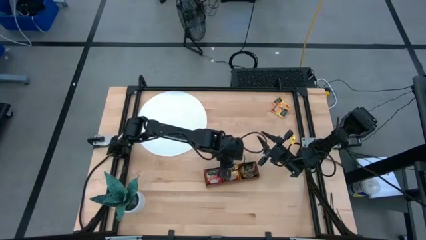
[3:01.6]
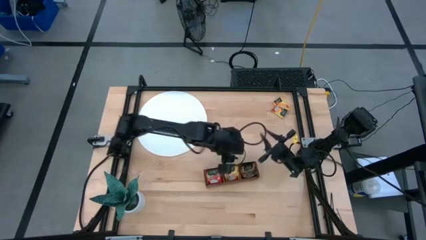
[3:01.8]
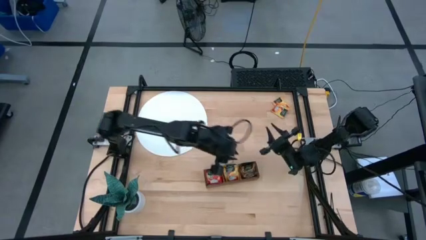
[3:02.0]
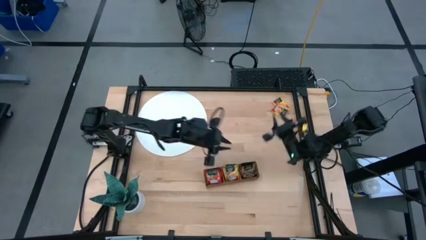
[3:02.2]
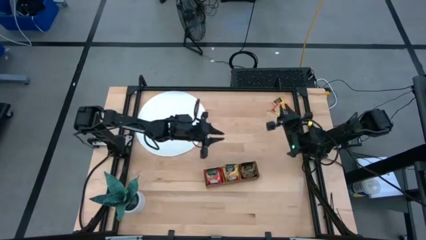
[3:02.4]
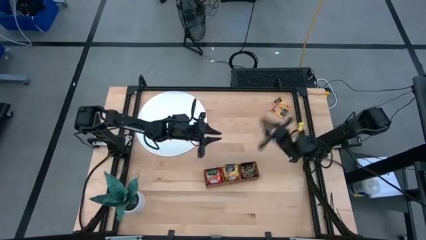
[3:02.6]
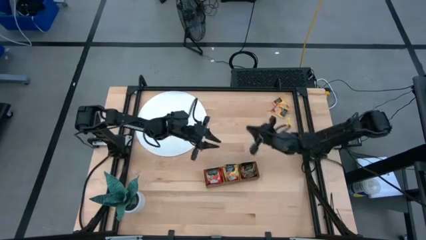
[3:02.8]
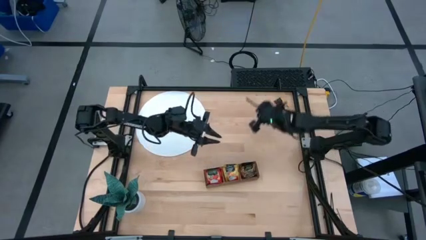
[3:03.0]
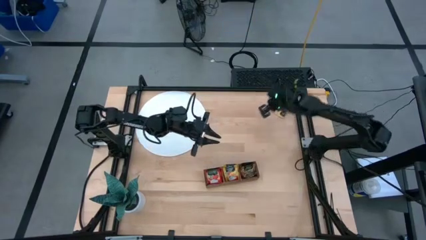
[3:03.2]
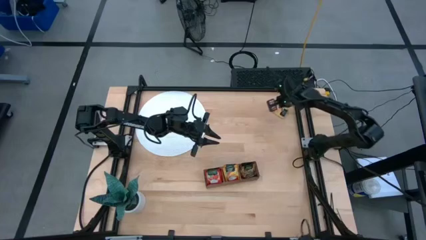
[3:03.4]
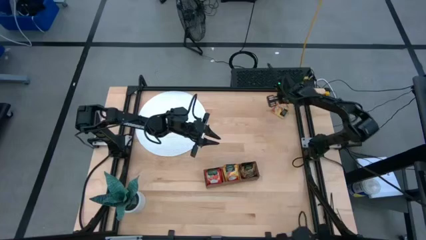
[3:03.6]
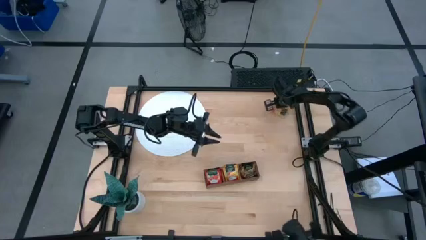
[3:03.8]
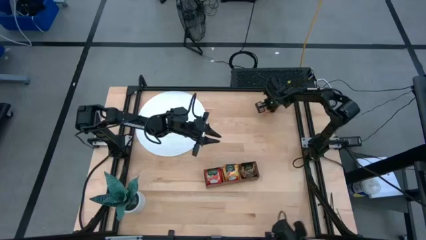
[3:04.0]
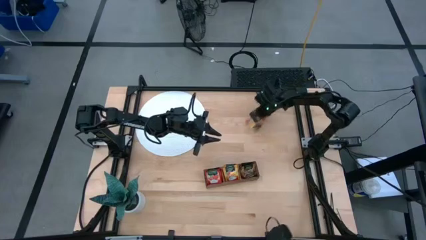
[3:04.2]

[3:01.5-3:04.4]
Task: Pick & Place Tea
Move the orange tea bags to the center of the table

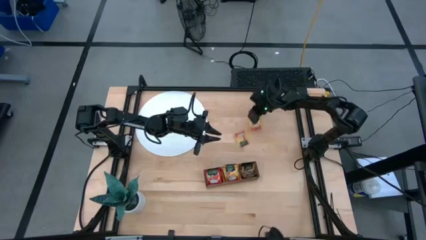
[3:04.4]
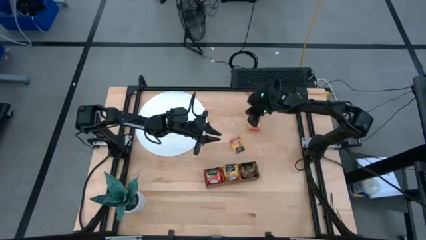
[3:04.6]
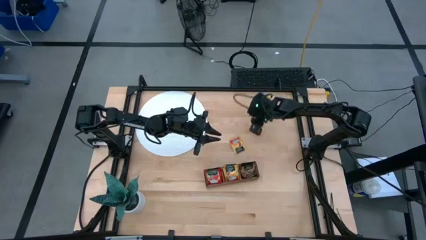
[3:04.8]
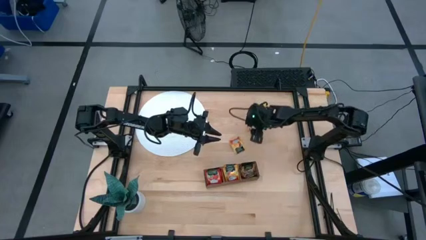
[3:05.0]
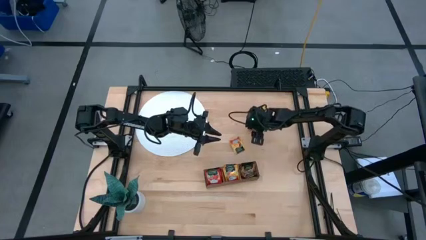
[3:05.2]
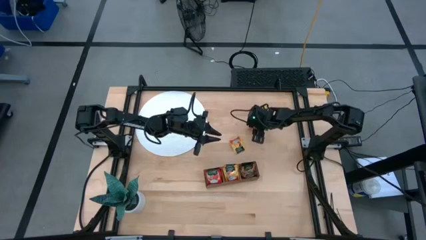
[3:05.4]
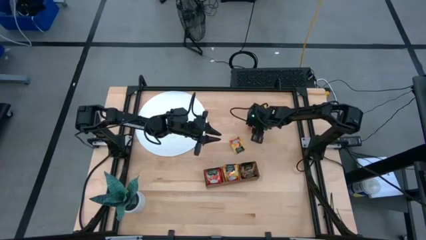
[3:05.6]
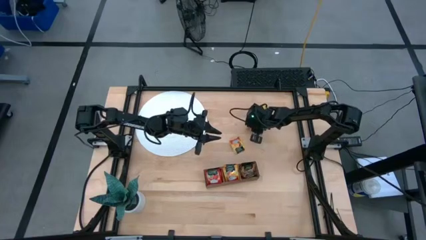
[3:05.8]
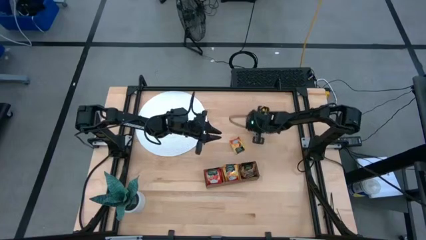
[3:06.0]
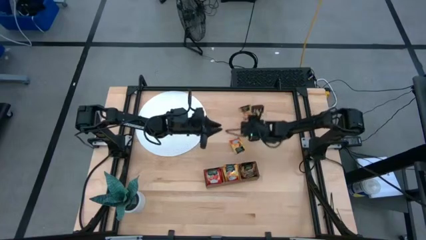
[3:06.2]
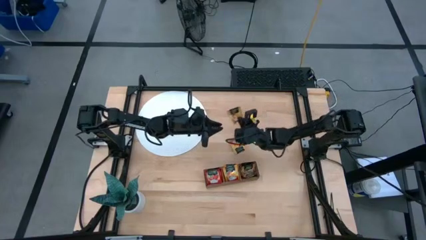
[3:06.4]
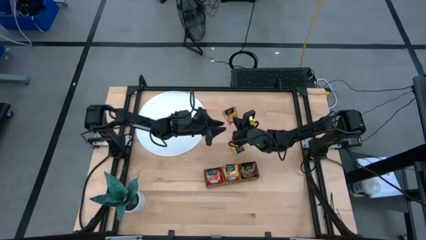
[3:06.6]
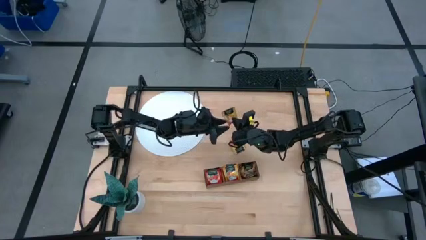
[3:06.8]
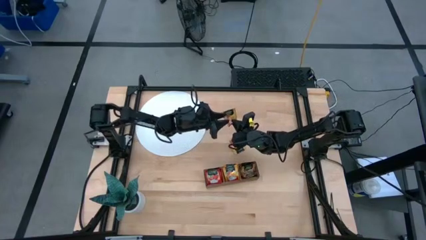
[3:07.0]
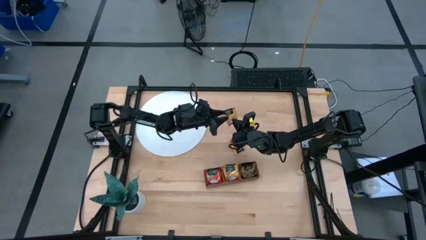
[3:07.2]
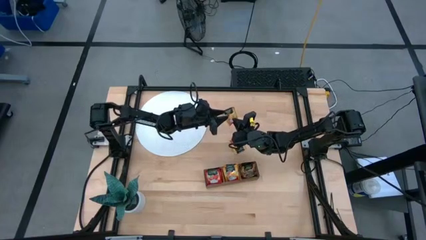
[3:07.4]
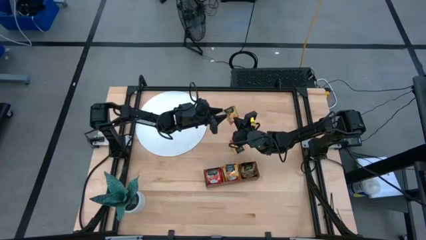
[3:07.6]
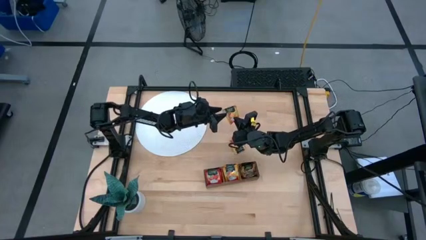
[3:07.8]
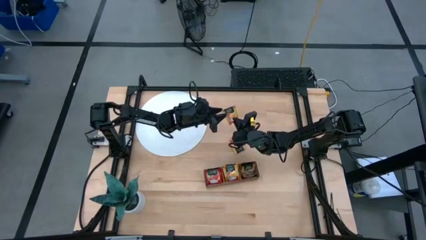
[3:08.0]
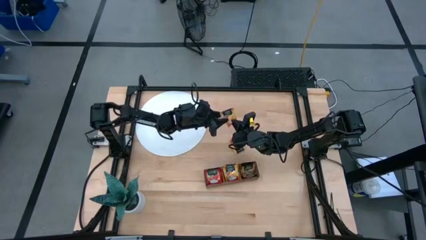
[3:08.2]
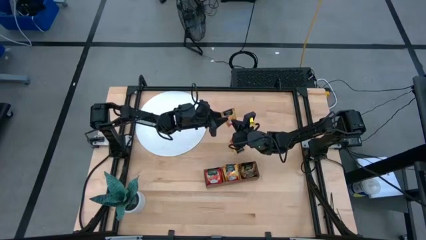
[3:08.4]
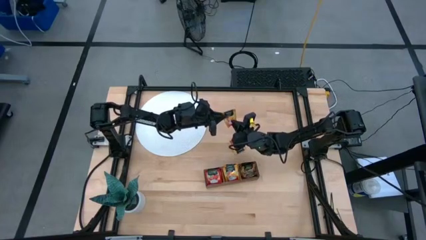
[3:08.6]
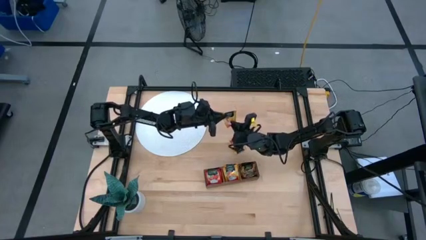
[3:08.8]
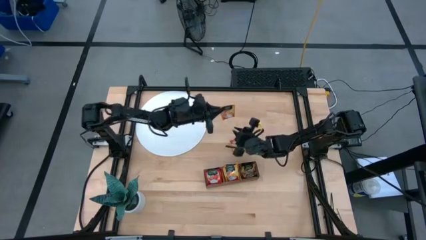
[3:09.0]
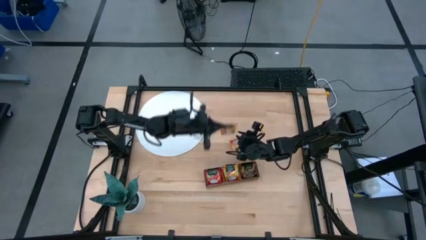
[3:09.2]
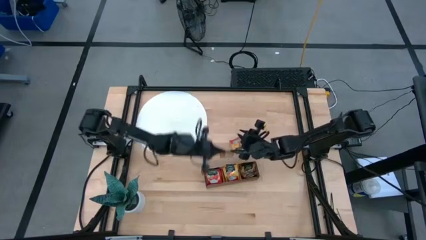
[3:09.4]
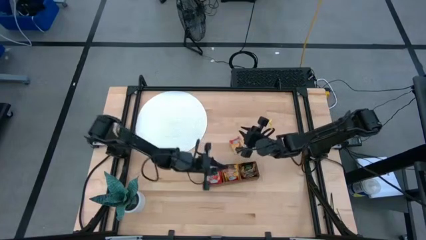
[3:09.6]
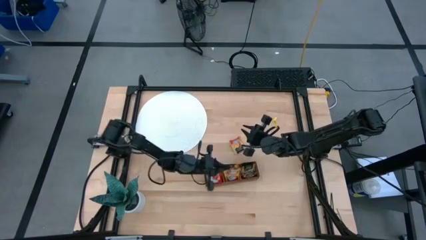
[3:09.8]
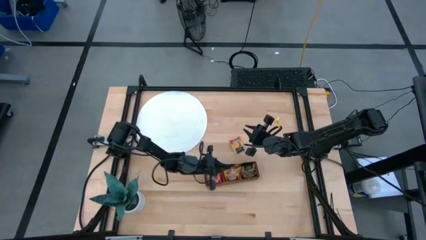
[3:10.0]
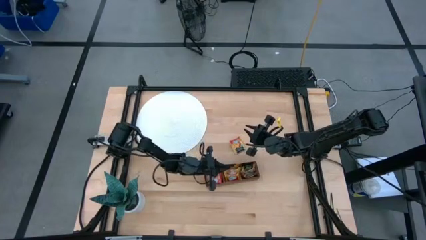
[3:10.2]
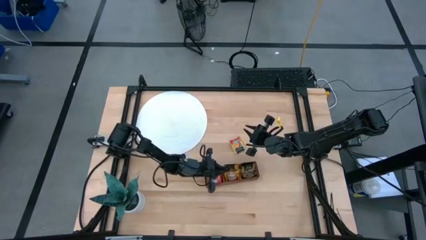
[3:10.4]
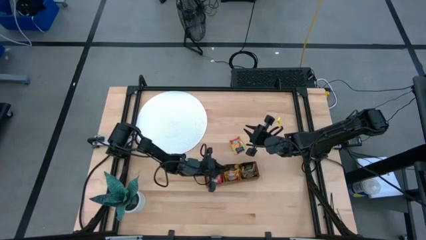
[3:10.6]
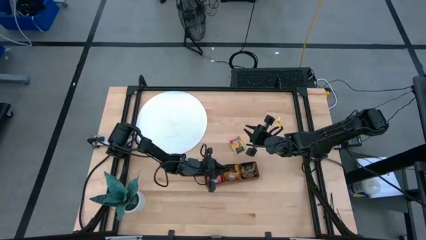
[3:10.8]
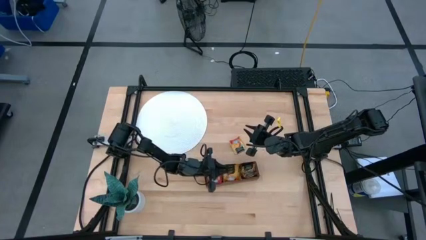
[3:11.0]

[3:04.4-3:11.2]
Put the orange tea bag into the middle section of the wooden organizer

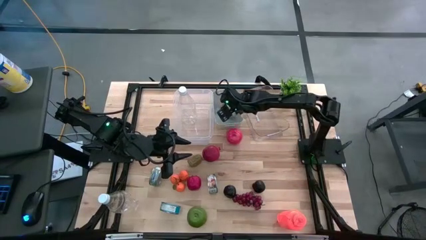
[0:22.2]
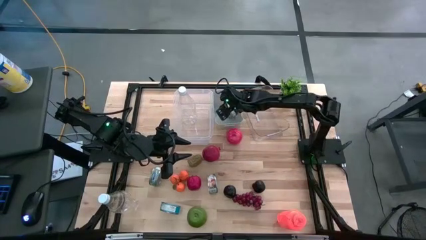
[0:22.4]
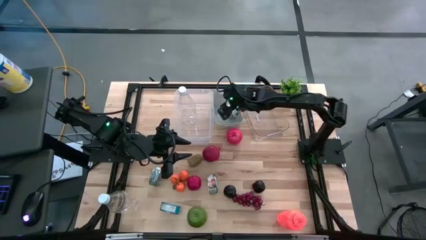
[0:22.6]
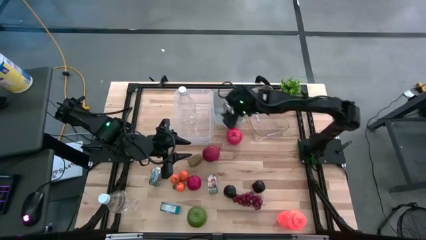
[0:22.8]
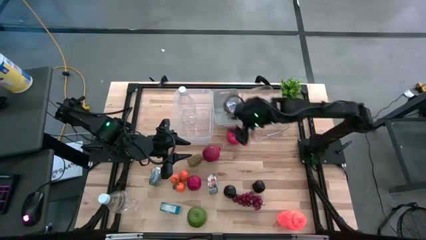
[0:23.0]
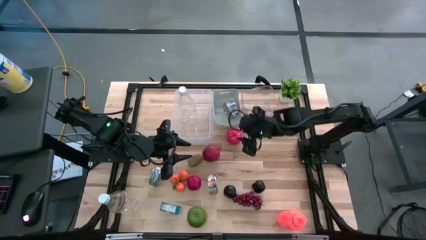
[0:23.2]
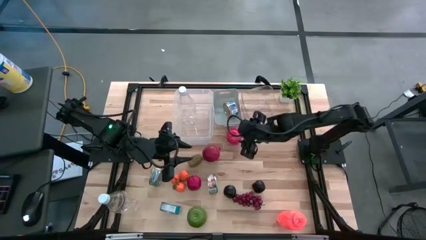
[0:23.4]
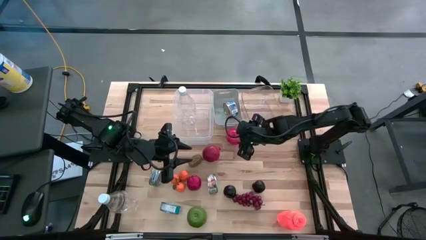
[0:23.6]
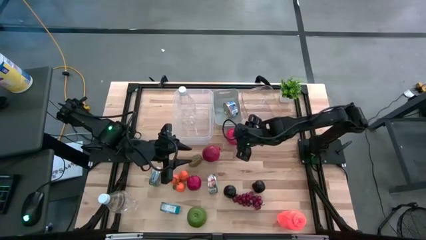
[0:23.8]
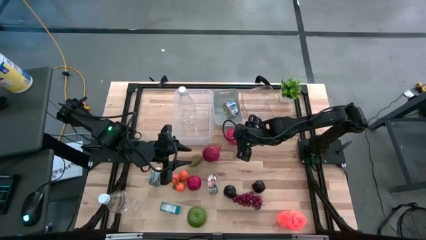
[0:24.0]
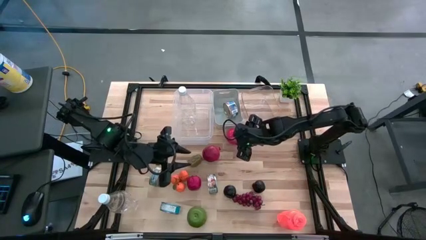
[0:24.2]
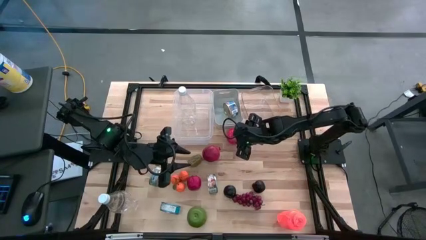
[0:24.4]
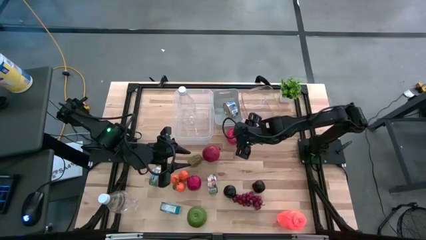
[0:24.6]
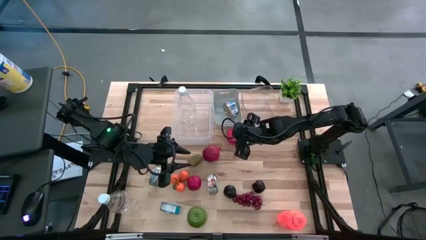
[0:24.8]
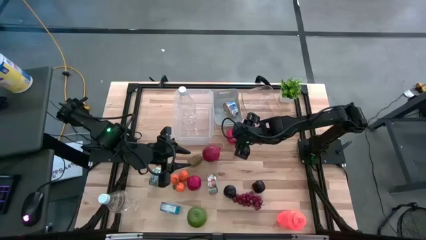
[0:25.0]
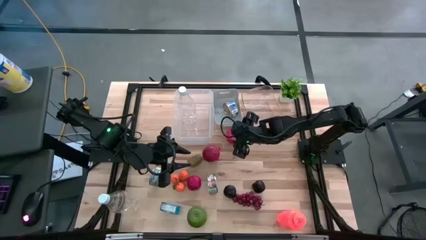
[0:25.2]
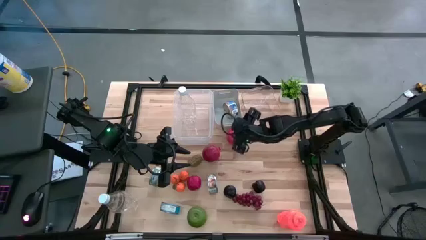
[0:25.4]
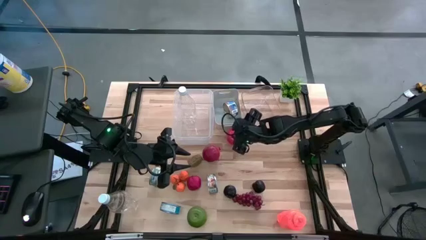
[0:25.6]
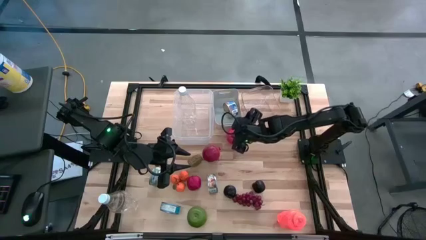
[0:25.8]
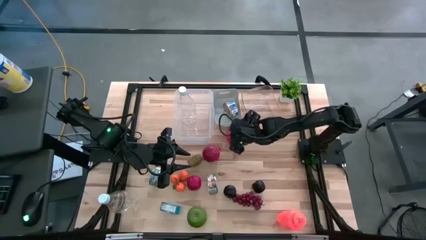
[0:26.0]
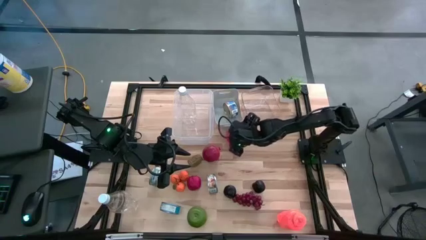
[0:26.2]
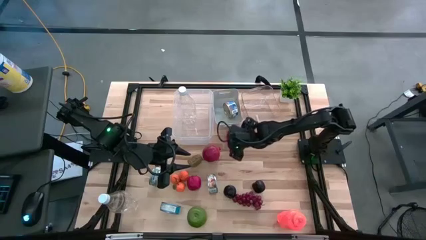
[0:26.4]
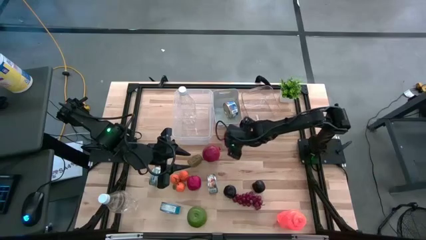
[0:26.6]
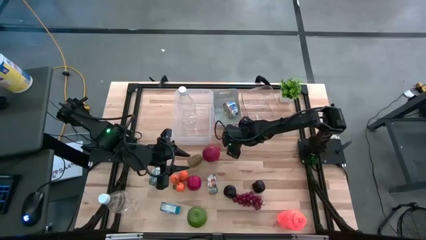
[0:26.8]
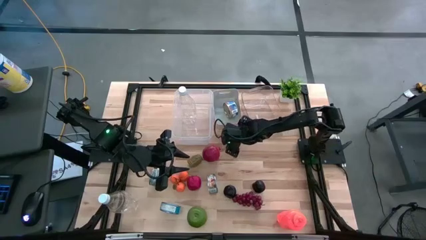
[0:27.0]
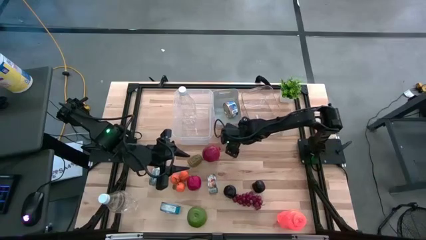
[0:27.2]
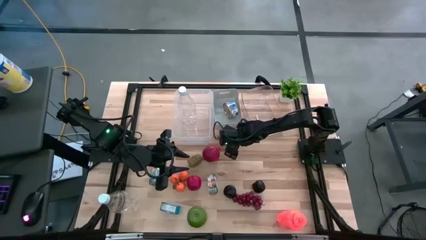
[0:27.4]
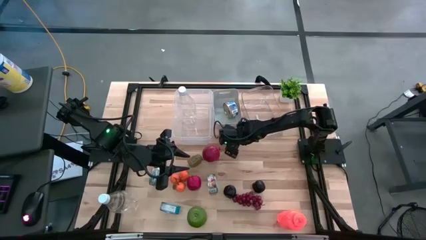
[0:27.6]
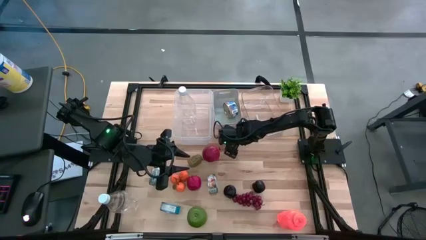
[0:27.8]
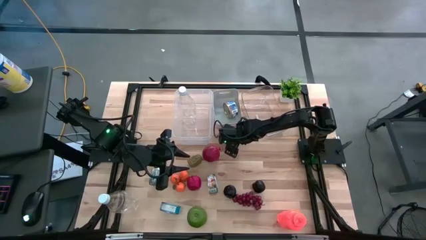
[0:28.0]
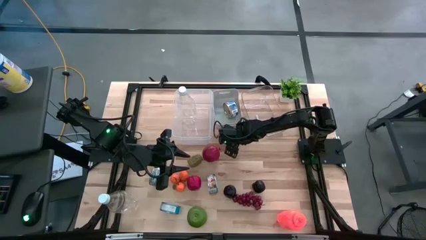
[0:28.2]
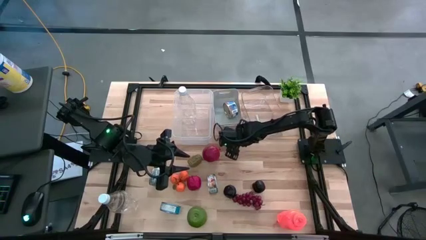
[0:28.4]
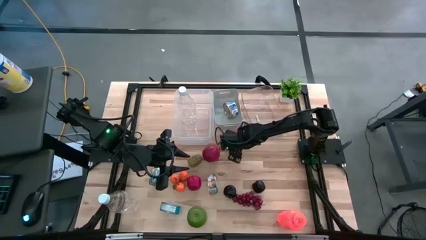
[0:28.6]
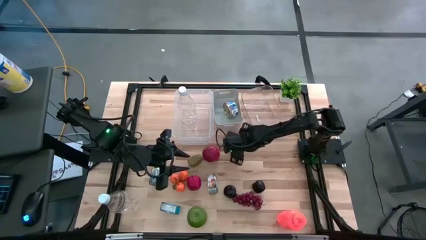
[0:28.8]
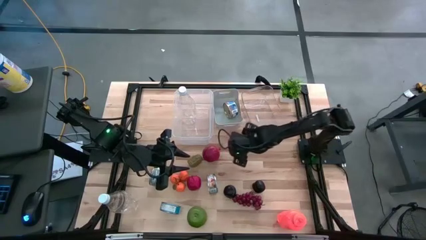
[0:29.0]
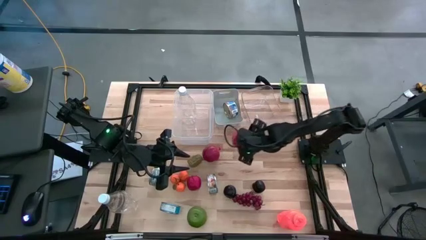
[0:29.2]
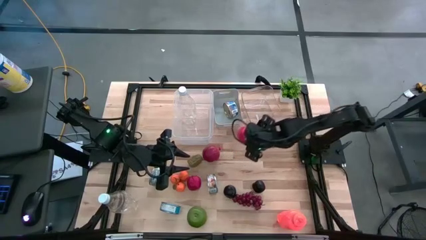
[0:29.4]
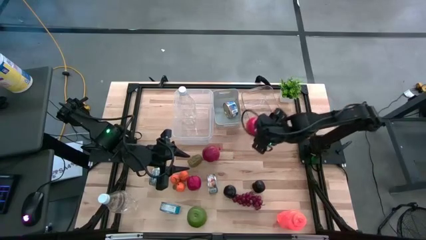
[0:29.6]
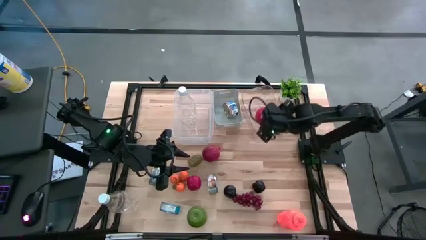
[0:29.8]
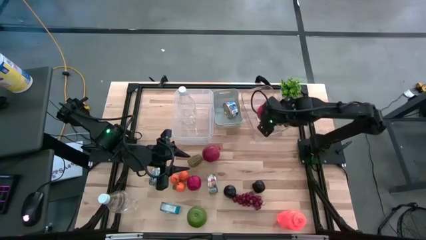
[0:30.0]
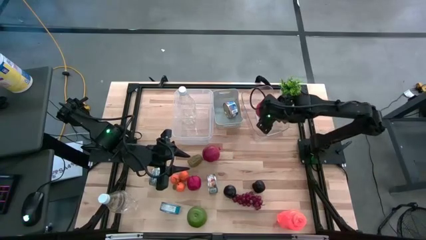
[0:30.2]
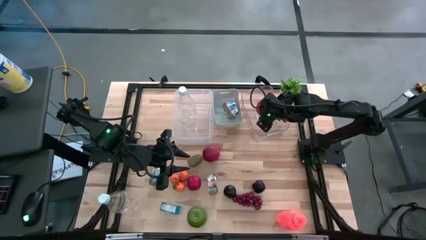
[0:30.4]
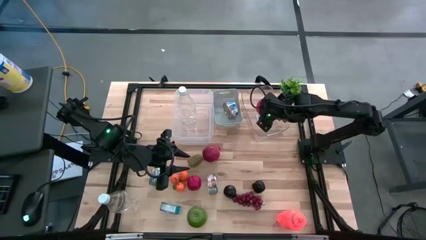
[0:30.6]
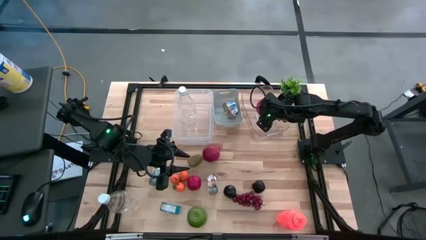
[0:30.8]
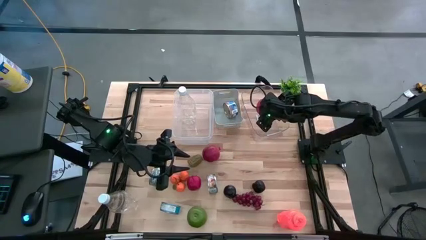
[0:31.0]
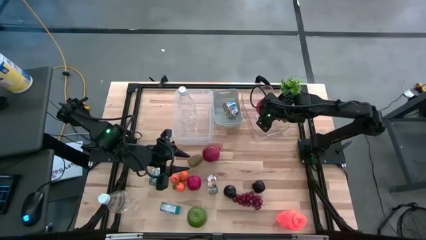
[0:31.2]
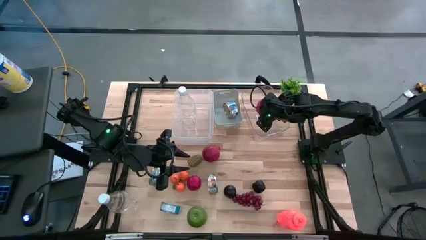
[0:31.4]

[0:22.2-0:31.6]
Task: Pick & Place Food Item
Put the apple into the right transparent bin
